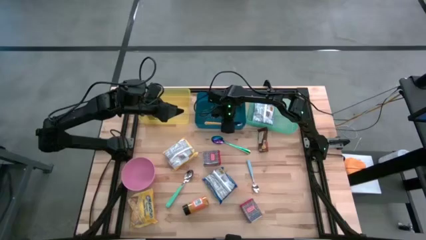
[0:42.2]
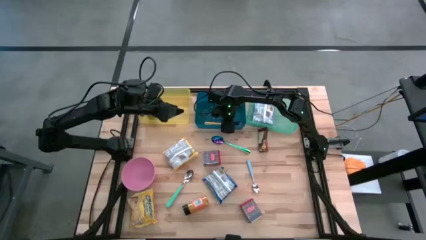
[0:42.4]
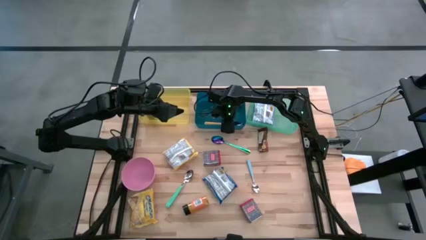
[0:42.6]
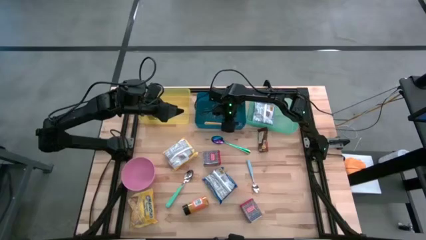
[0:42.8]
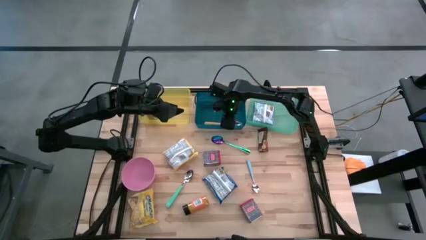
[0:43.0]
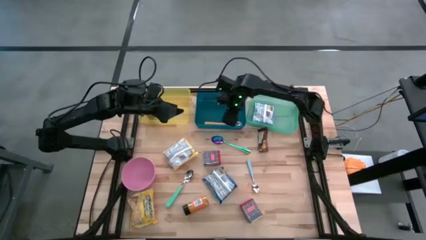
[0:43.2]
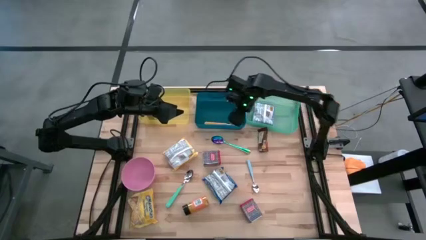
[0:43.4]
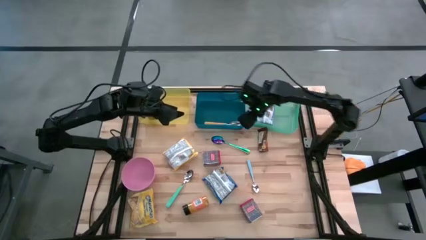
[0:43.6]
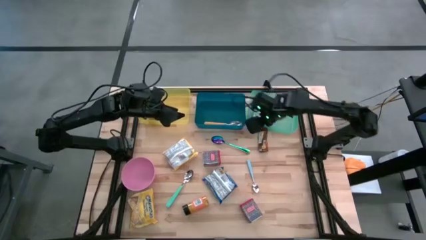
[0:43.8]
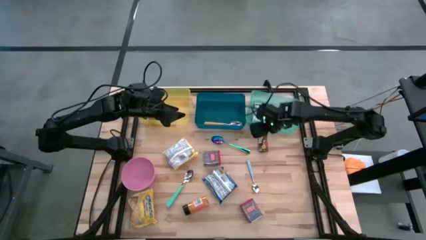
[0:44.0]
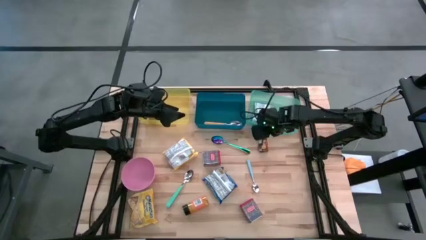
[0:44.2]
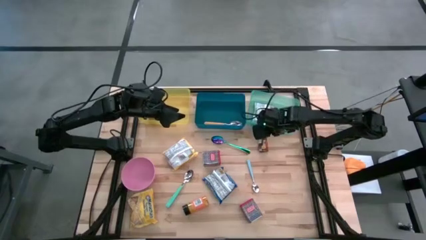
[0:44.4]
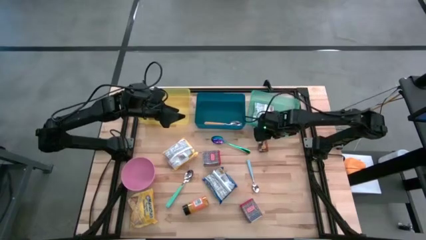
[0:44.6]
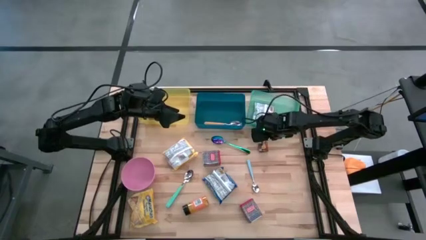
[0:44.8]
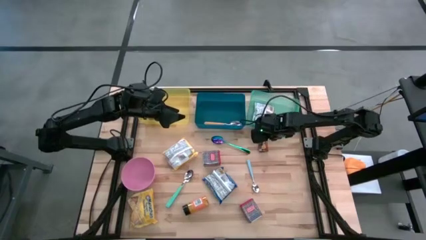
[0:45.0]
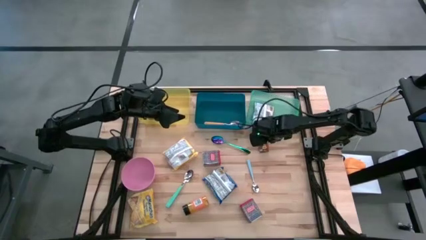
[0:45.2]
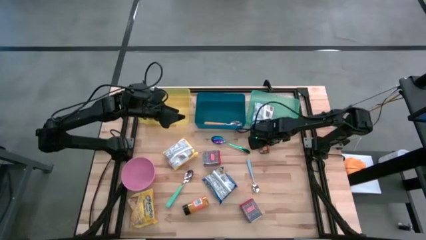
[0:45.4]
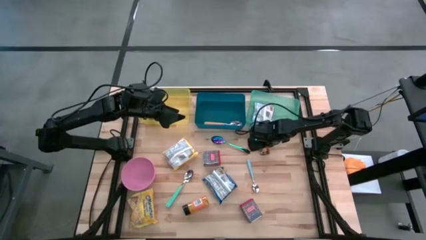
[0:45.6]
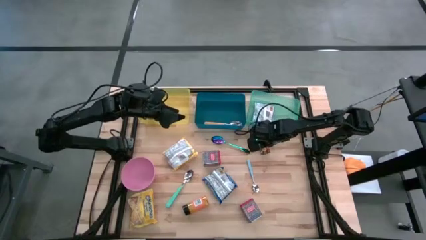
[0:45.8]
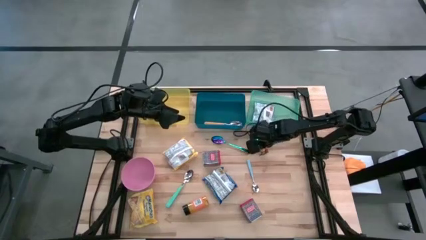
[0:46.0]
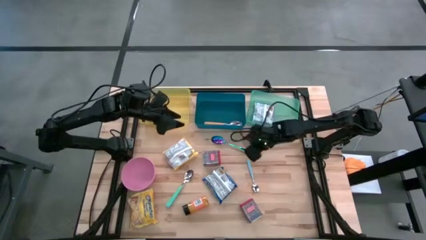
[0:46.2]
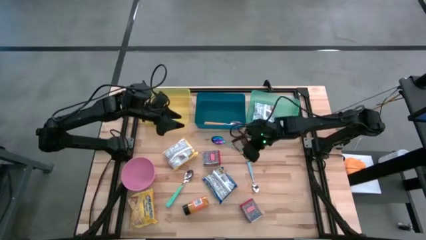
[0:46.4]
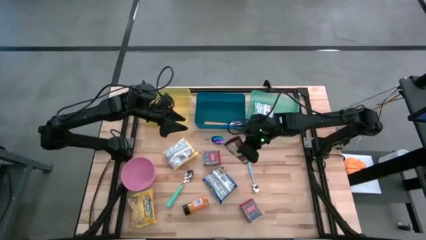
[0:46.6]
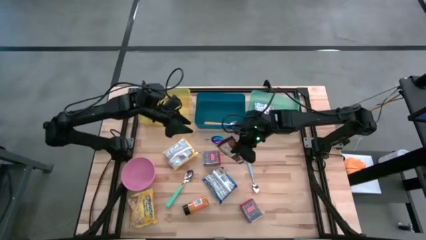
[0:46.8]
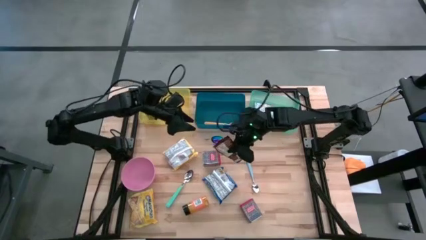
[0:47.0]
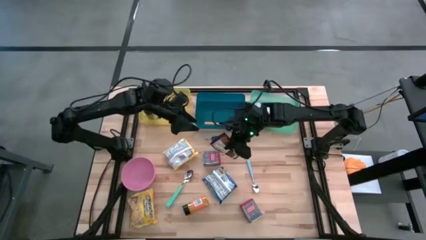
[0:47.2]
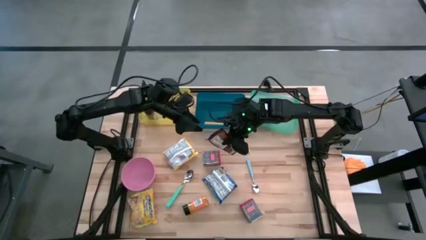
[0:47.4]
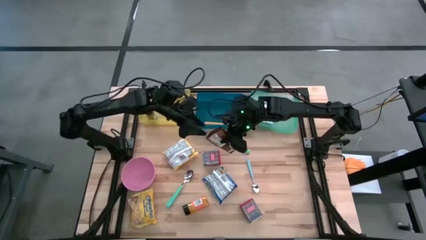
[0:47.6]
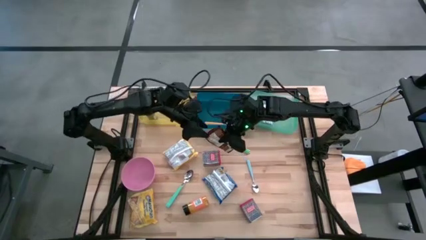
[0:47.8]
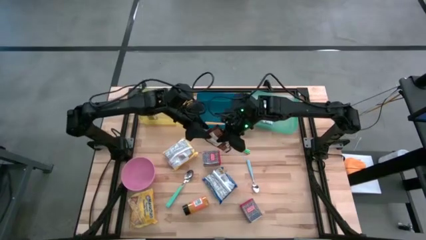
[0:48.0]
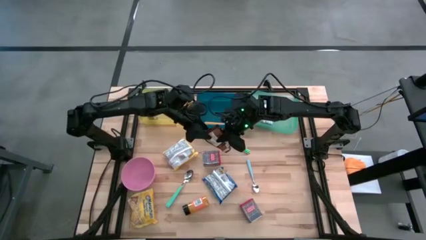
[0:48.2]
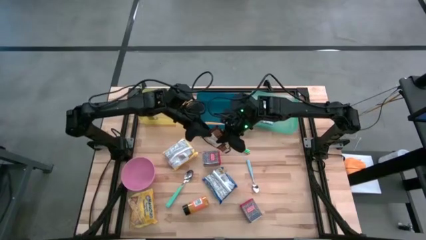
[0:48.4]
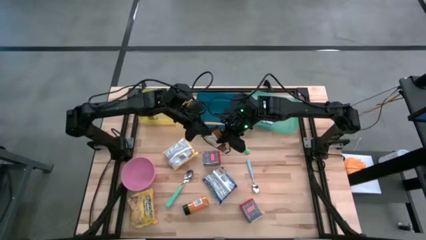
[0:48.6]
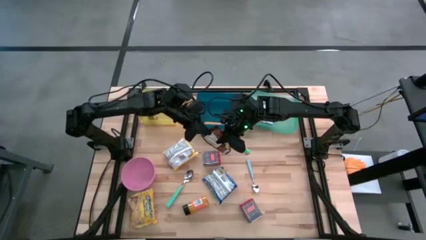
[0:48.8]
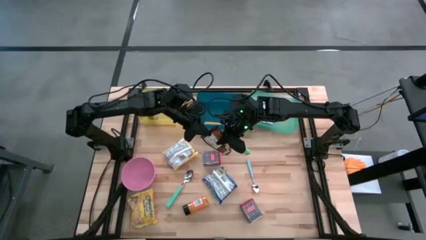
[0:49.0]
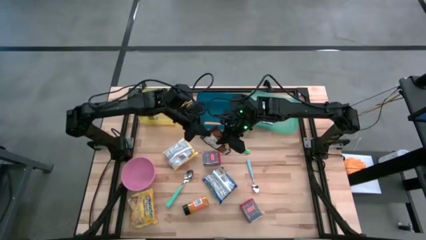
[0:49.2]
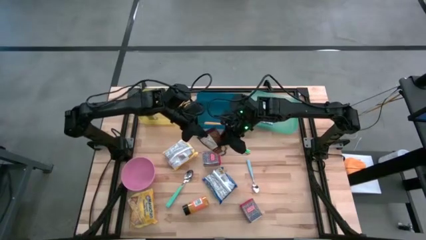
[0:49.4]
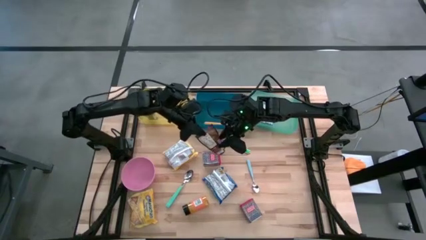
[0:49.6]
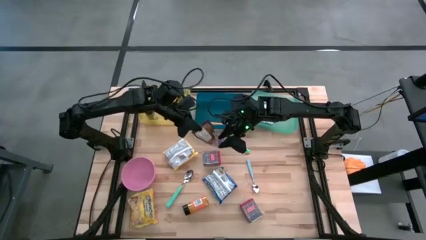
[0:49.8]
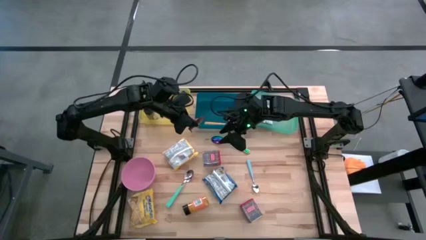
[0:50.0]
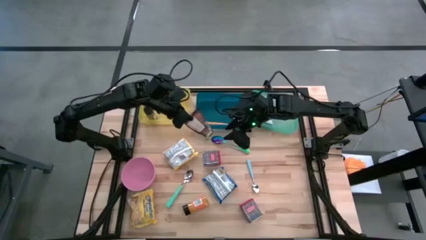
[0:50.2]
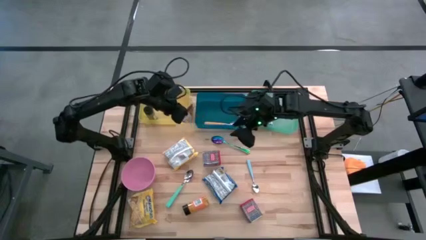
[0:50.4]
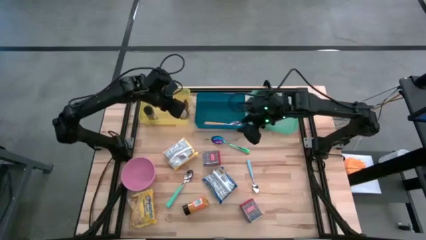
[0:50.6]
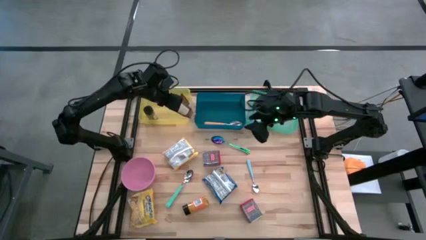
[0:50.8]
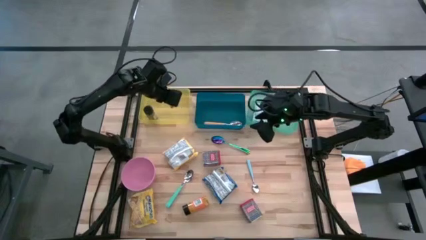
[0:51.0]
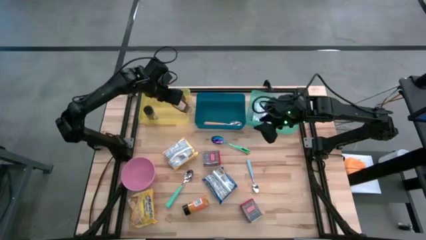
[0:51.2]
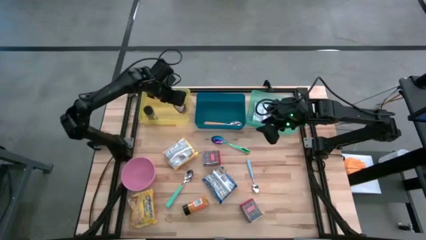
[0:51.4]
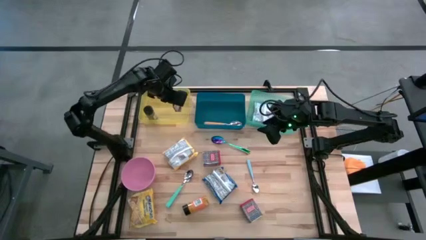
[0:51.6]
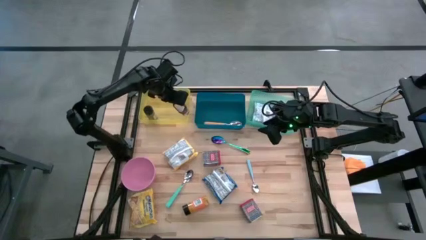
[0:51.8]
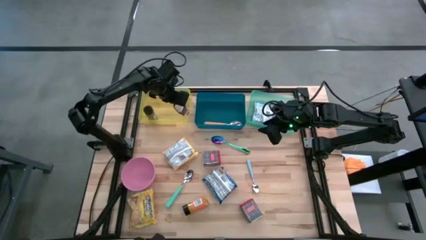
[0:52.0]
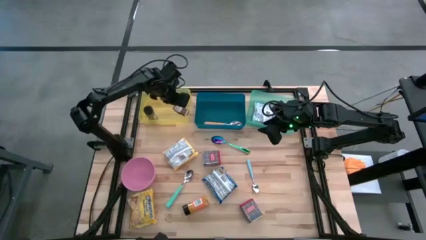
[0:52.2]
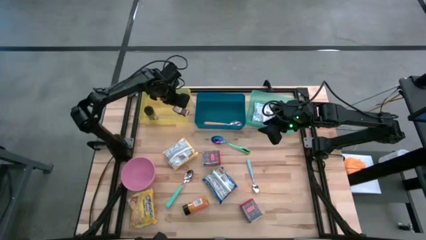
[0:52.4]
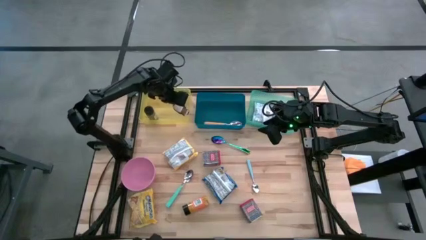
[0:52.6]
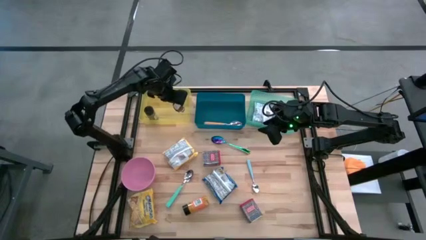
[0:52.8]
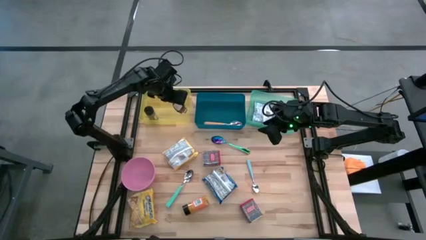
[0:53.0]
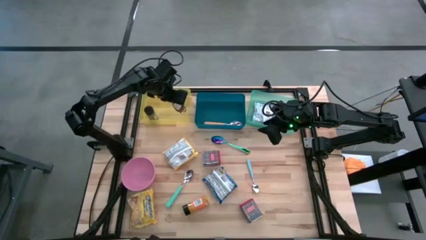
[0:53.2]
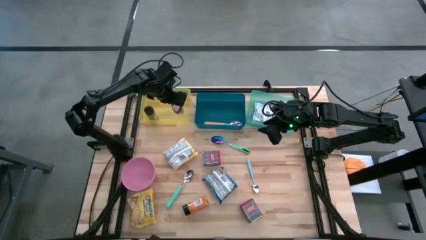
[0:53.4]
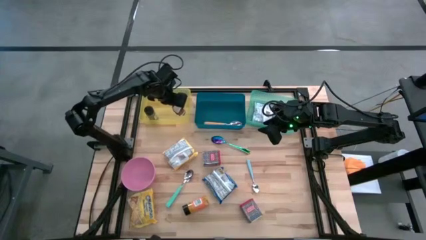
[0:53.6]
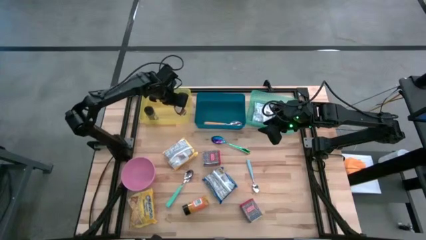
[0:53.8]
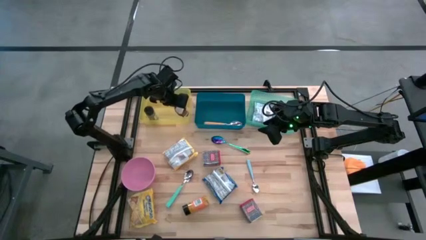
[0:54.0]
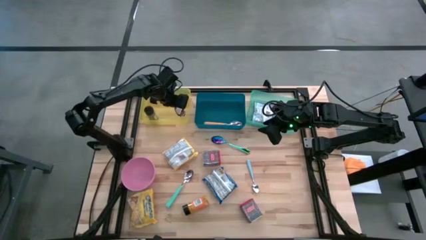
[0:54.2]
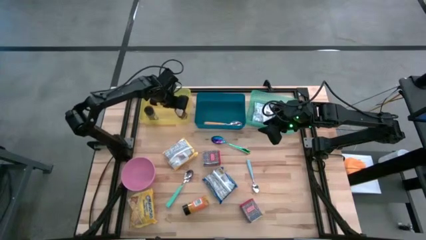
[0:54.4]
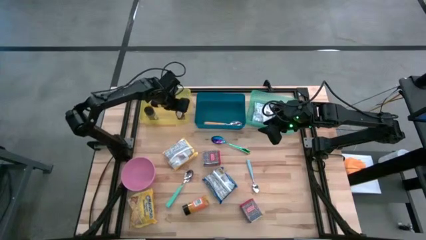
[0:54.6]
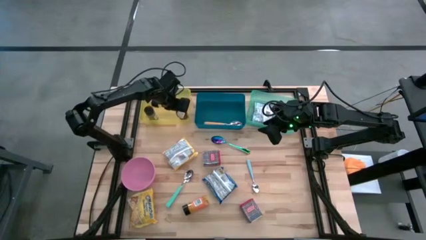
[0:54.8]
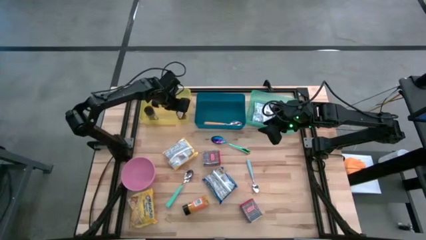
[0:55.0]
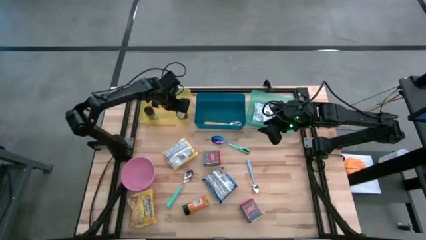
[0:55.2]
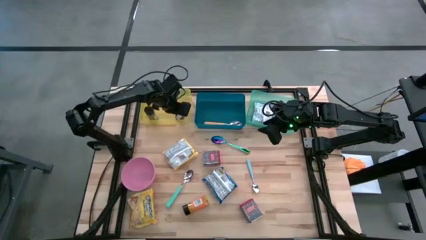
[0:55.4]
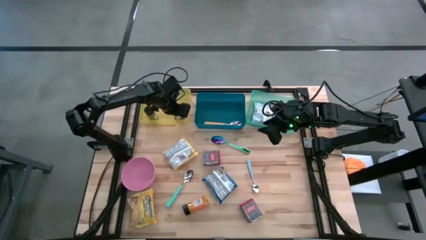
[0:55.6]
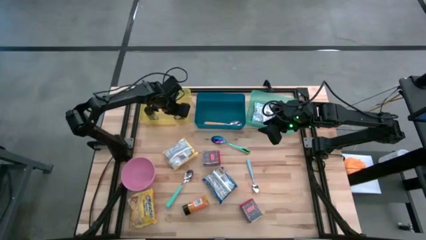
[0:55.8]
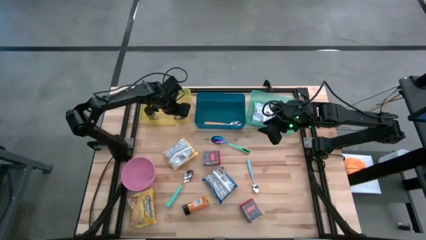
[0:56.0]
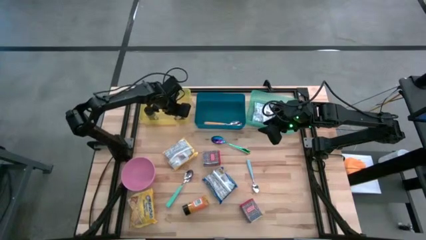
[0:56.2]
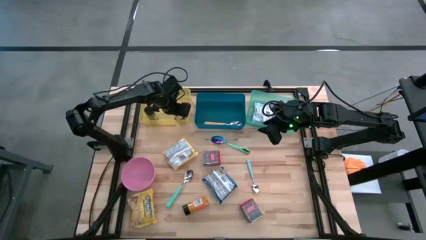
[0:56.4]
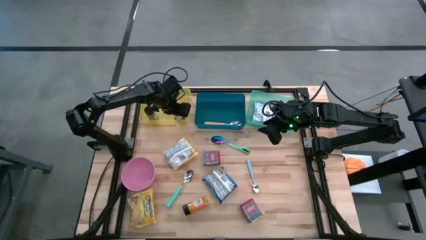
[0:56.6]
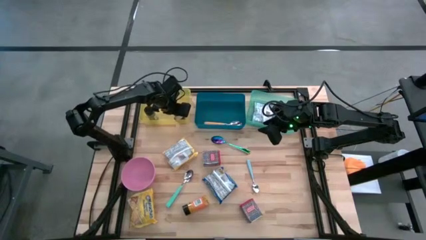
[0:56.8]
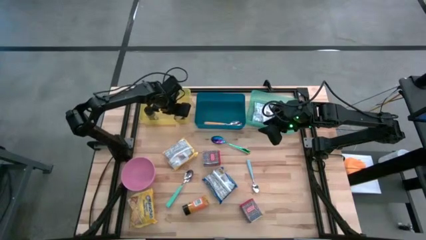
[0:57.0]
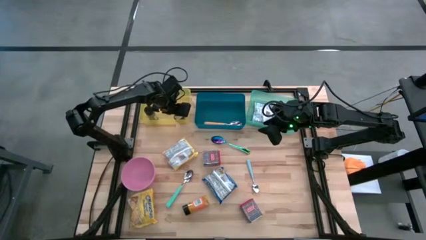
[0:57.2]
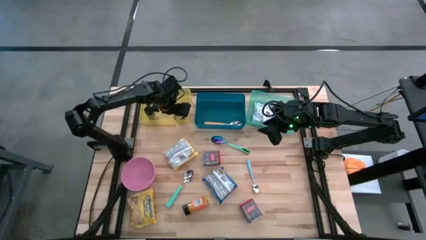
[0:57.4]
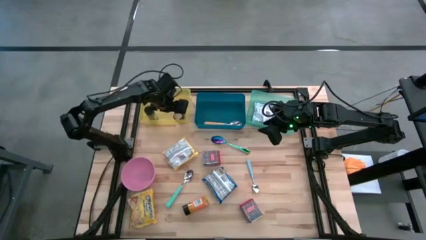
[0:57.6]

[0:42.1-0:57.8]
Put the orange seasoning pack into the yellow bin
